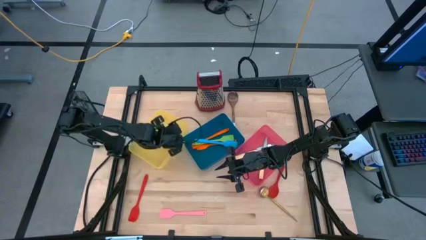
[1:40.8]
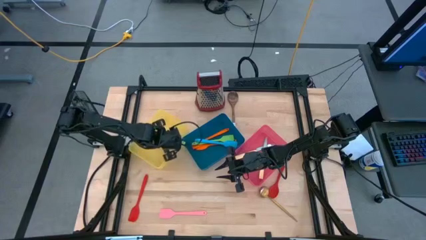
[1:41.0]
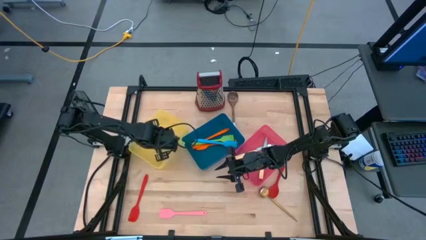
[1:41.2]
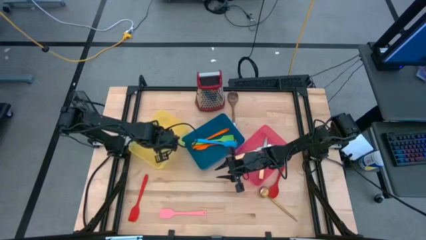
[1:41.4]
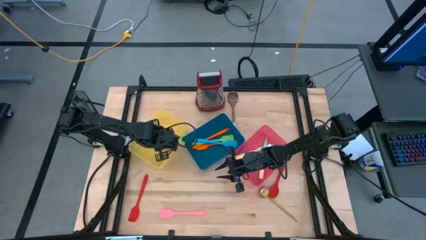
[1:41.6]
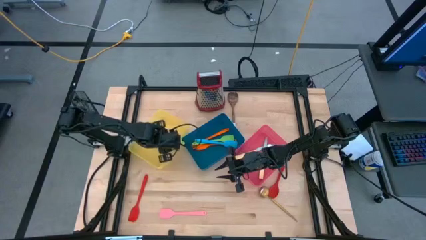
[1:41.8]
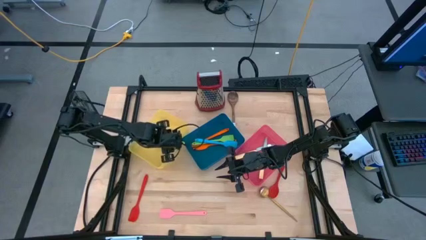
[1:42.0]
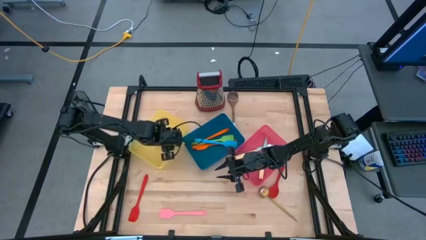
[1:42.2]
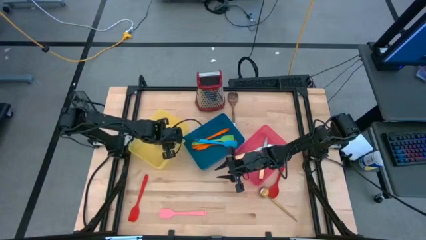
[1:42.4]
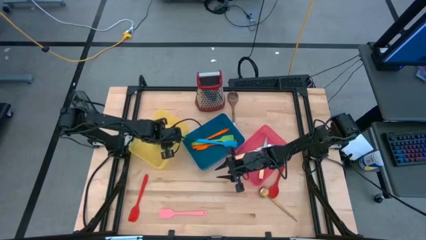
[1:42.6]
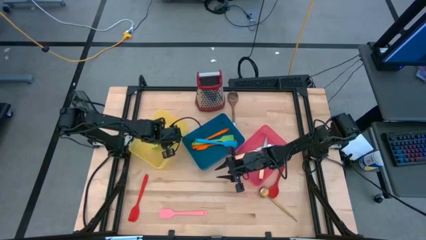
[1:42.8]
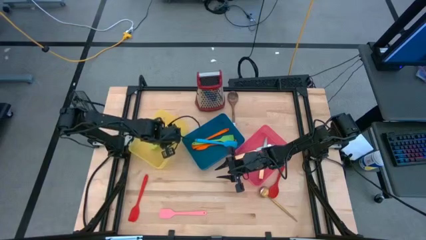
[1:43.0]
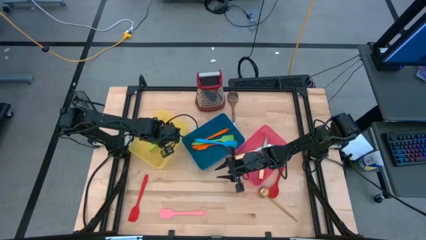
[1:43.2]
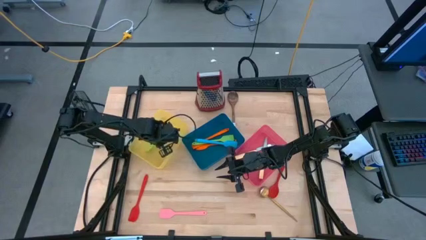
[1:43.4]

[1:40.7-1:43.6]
Task: Pick & Place Kitchen Items
Put the green serving spoon into the yellow bin

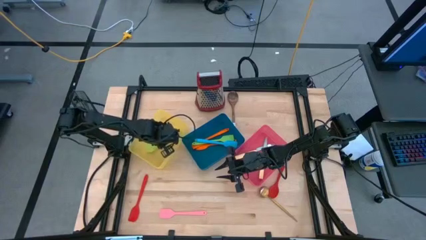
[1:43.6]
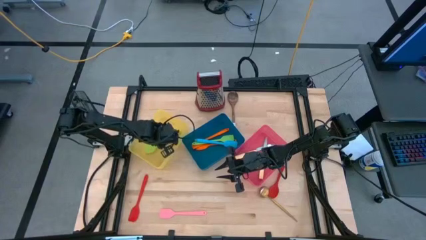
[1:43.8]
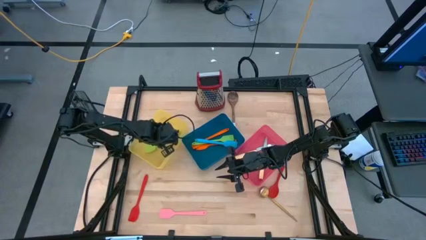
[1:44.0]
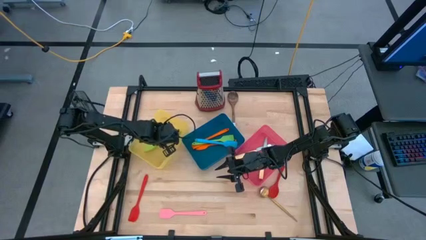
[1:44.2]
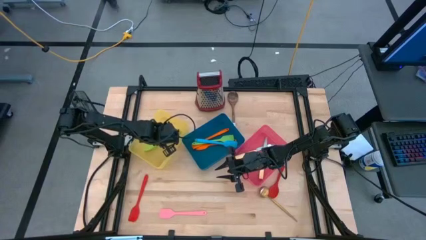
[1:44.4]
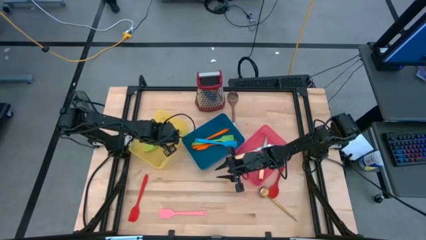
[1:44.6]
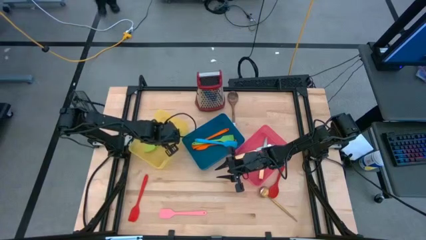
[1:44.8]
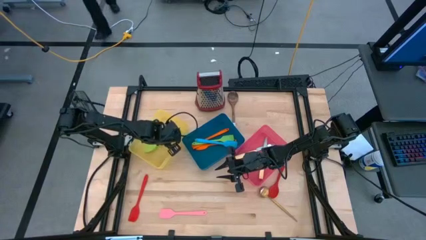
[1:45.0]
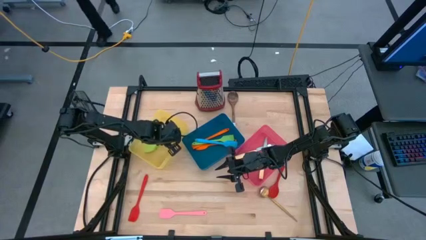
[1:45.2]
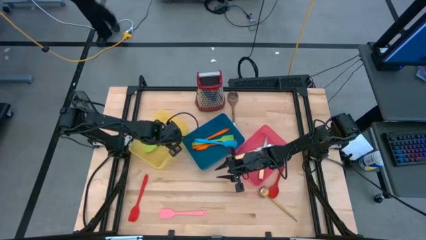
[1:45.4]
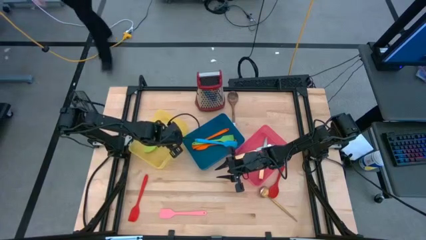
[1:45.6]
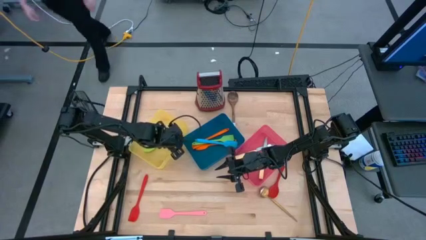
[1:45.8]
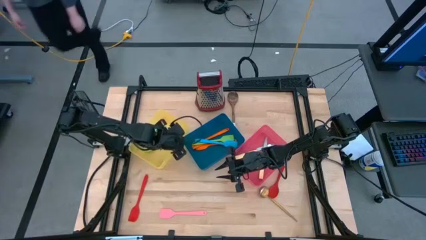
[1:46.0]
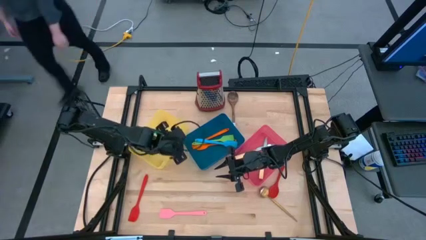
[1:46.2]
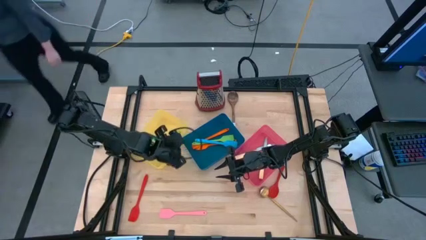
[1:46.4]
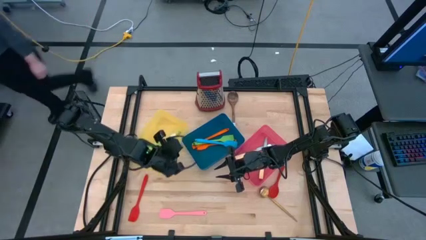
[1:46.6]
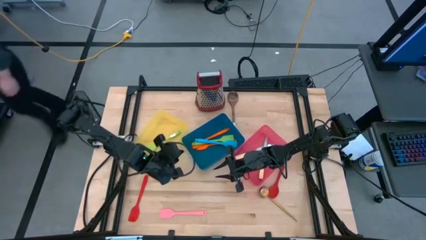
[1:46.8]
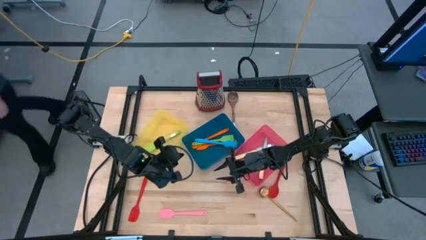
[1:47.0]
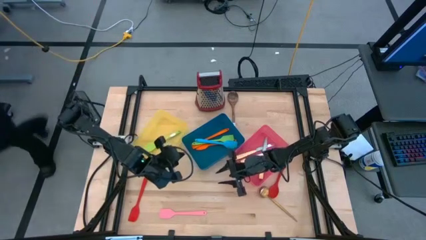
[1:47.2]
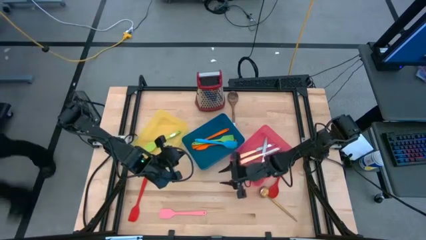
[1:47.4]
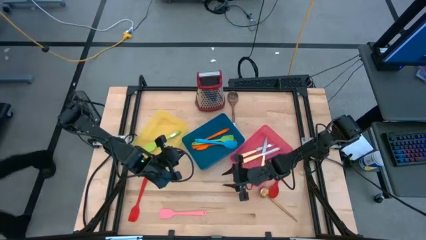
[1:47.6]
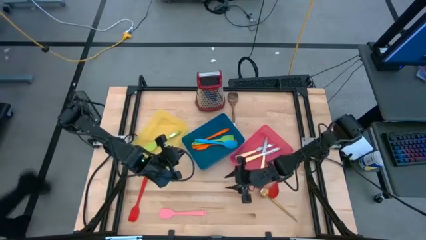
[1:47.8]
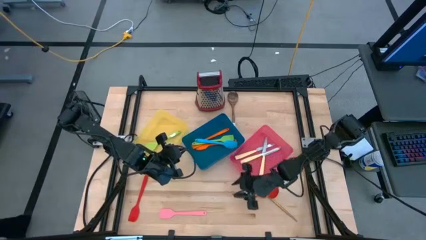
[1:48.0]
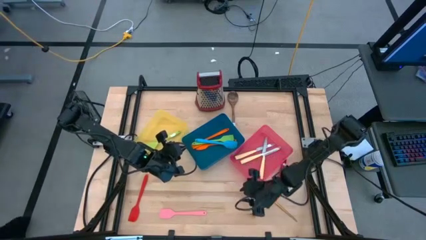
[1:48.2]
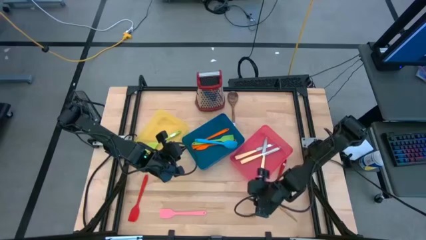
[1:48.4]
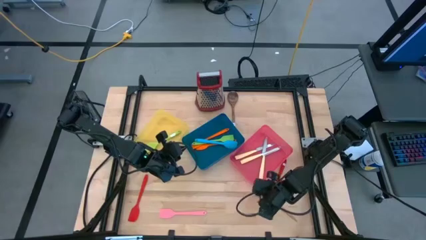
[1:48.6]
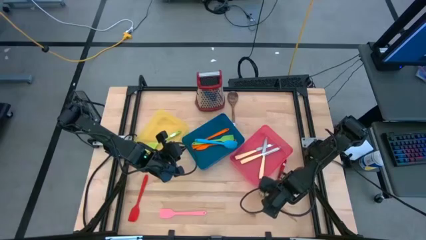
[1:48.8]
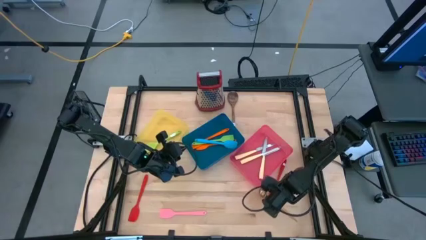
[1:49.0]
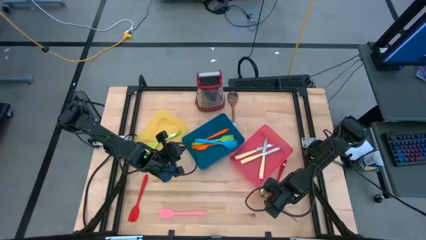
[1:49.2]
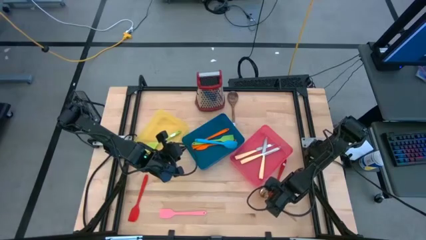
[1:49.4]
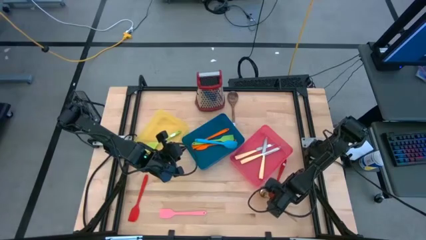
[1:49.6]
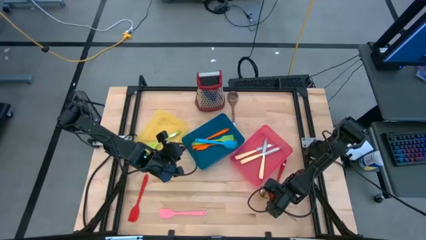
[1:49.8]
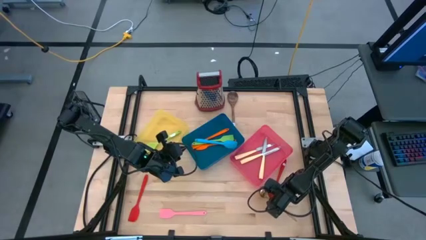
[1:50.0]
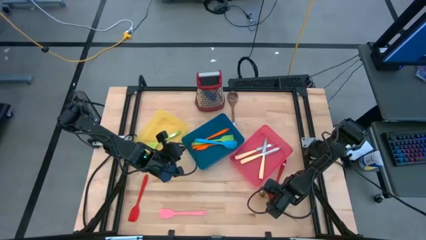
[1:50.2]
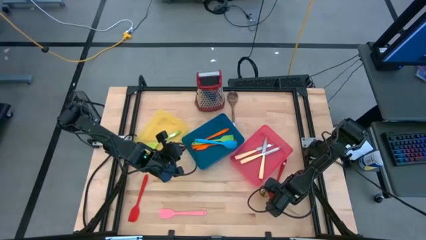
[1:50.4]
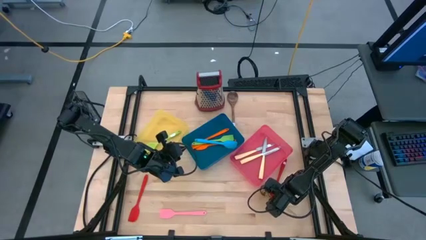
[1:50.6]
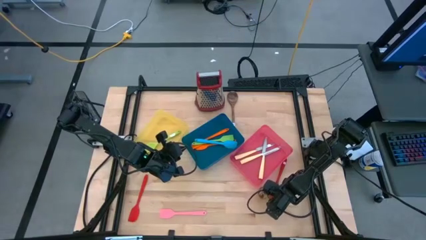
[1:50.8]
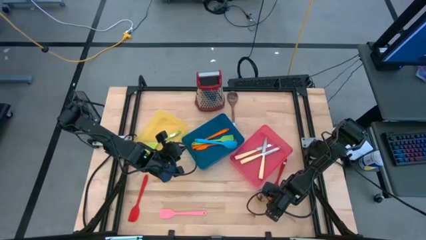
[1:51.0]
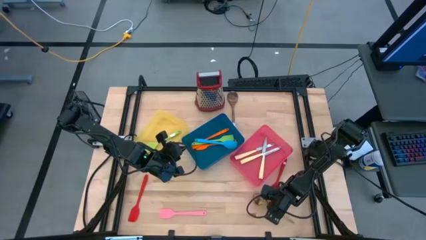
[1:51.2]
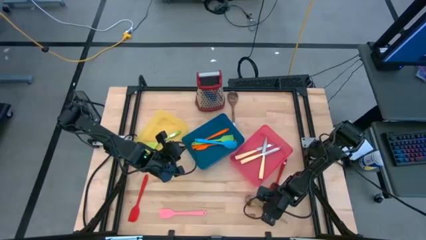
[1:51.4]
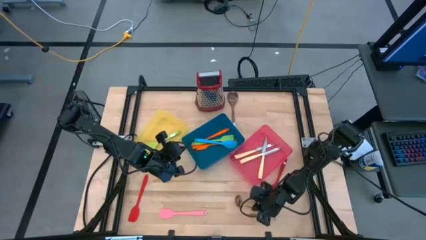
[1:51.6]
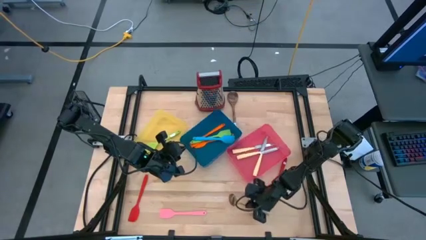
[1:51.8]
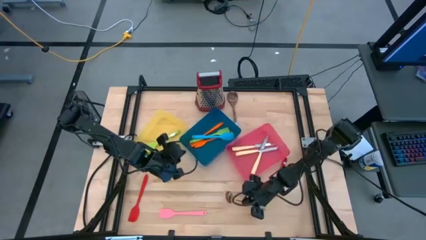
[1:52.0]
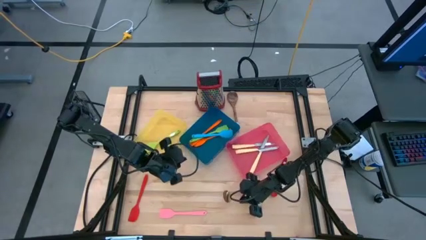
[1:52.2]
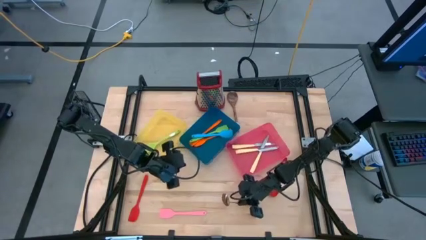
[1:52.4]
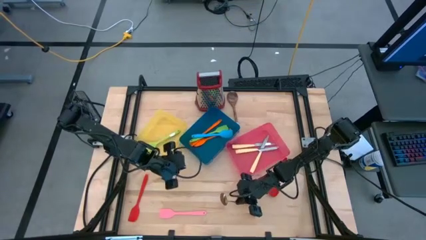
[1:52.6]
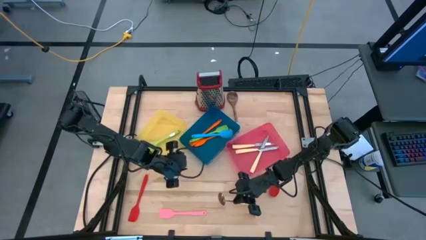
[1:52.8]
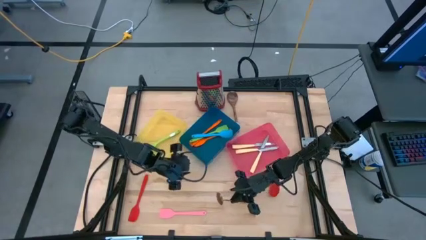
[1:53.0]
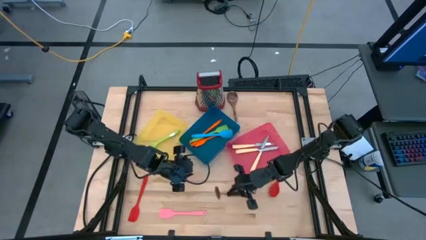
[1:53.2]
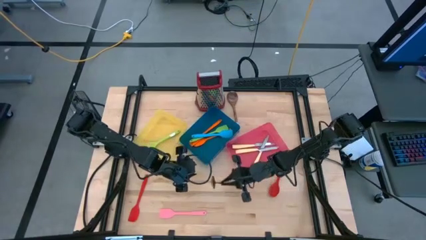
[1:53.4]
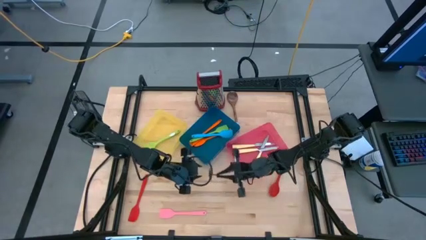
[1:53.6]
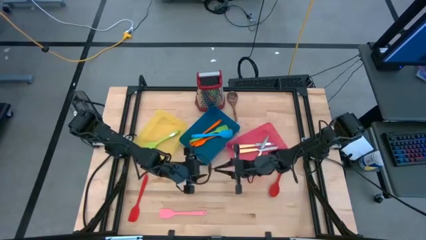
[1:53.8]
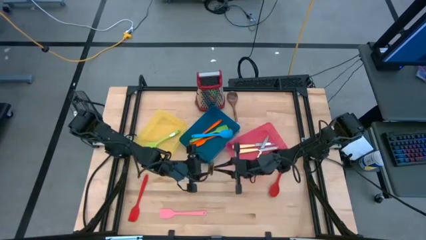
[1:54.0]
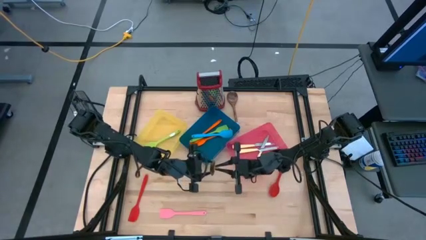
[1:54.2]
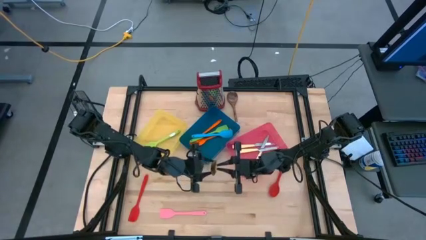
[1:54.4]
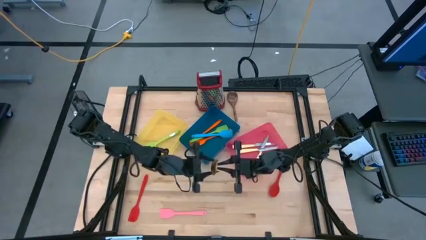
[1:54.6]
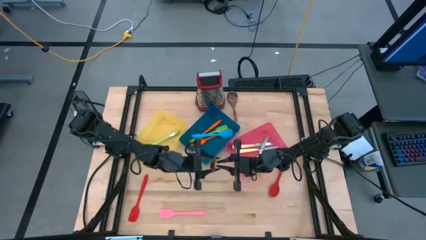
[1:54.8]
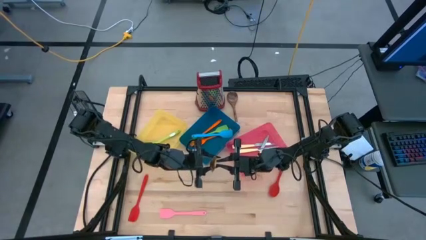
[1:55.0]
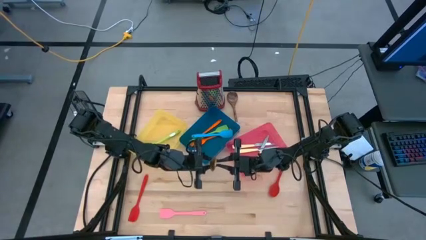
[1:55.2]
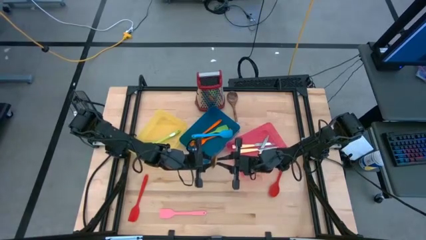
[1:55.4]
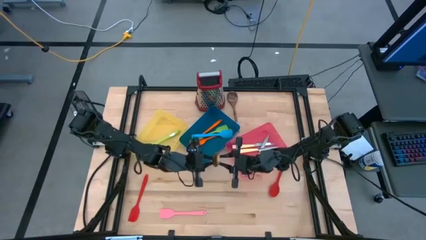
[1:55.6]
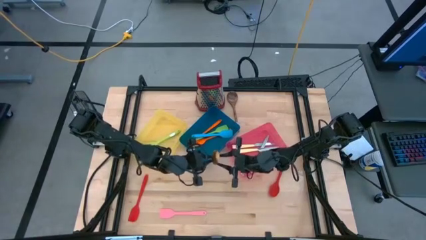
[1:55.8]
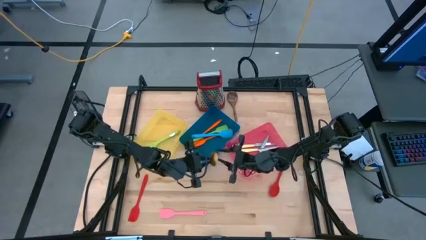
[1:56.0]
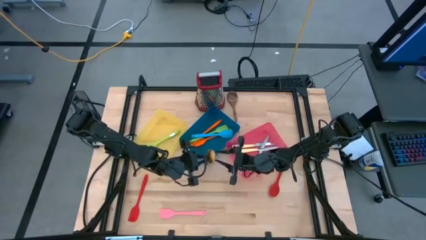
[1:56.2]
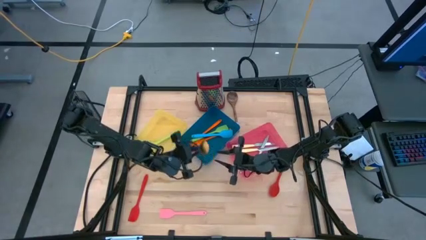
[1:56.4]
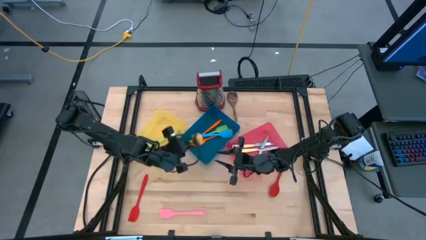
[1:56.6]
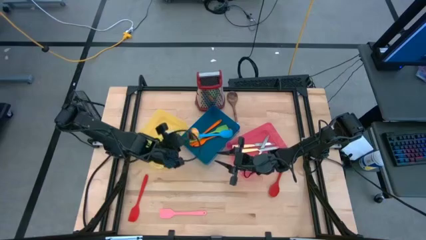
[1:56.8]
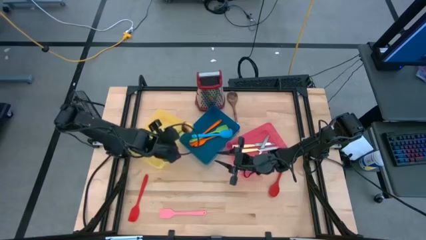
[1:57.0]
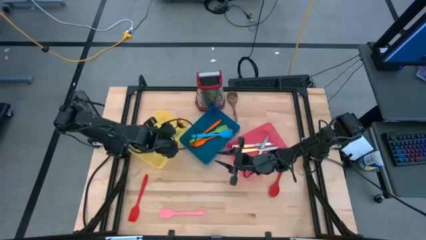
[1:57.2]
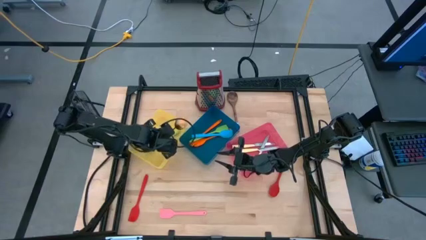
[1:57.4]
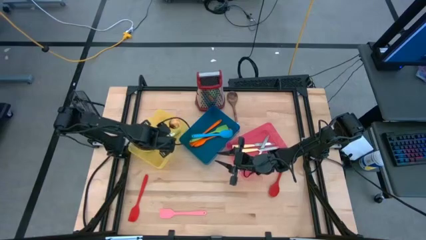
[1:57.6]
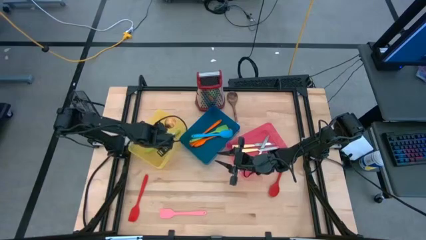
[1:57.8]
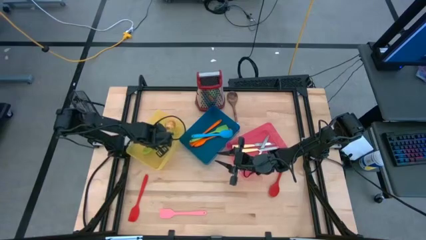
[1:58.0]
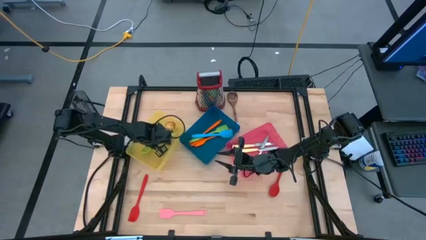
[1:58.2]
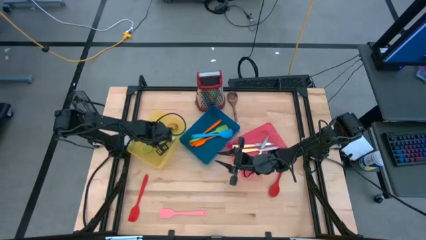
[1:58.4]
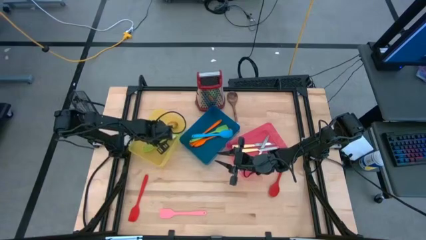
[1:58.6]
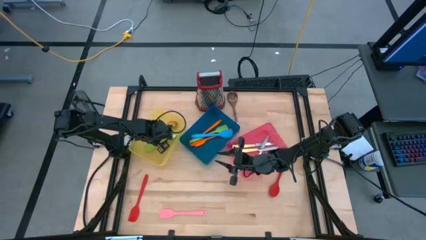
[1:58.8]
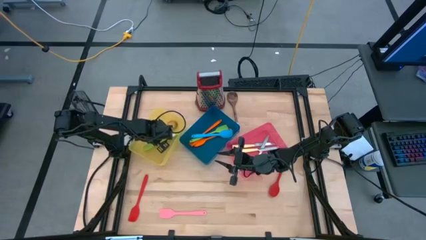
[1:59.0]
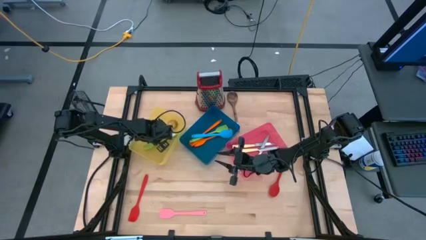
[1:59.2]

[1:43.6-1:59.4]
Put the gold serving spoon into the yellow bin
